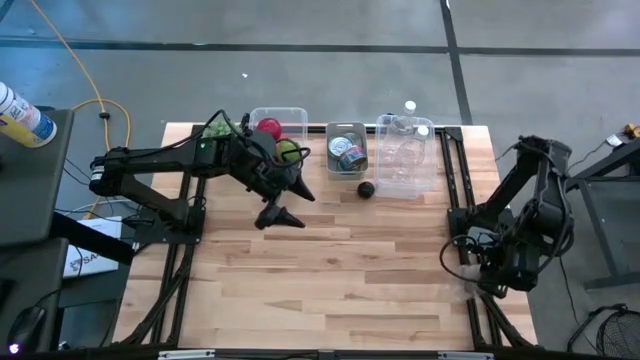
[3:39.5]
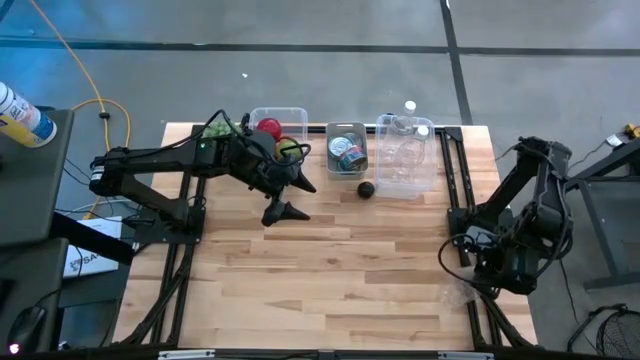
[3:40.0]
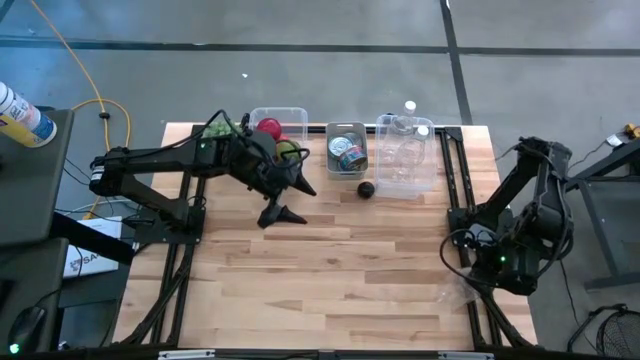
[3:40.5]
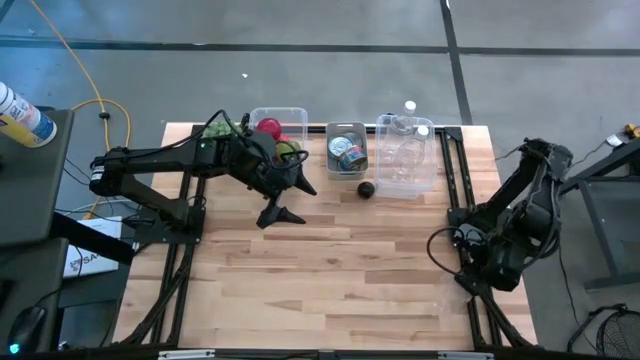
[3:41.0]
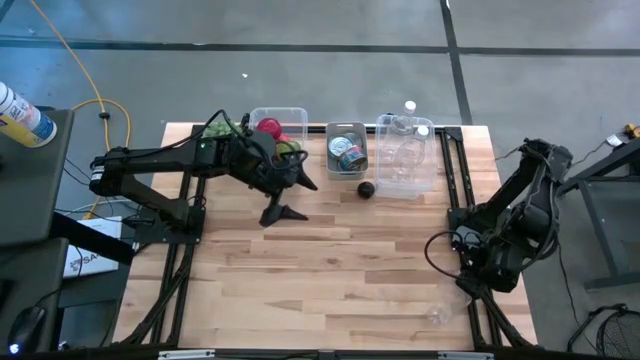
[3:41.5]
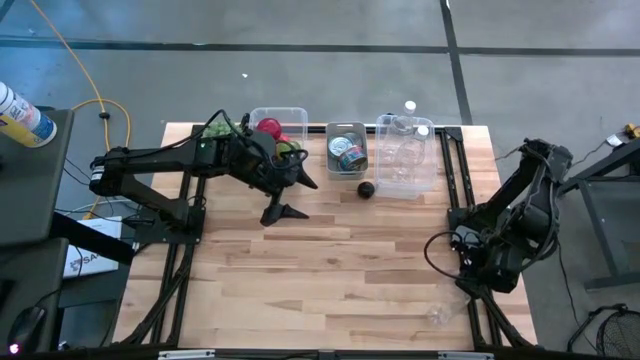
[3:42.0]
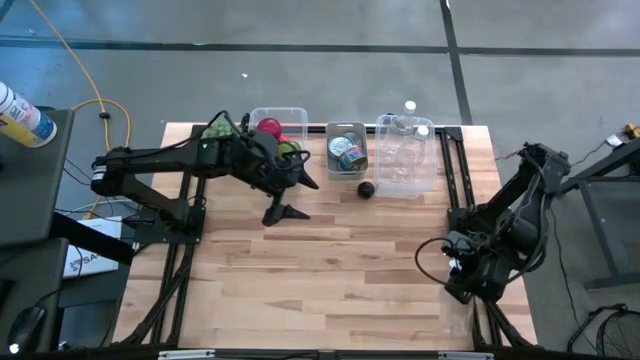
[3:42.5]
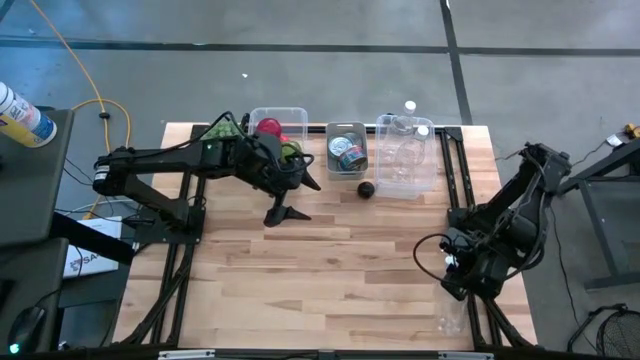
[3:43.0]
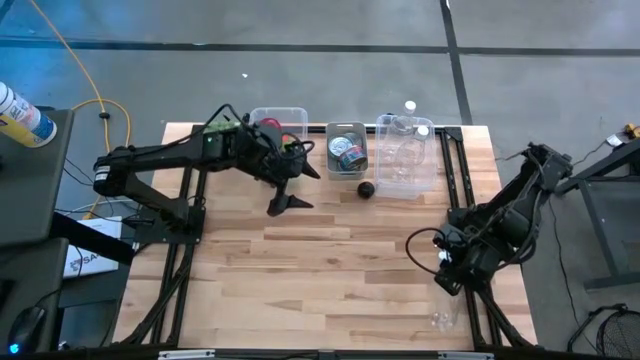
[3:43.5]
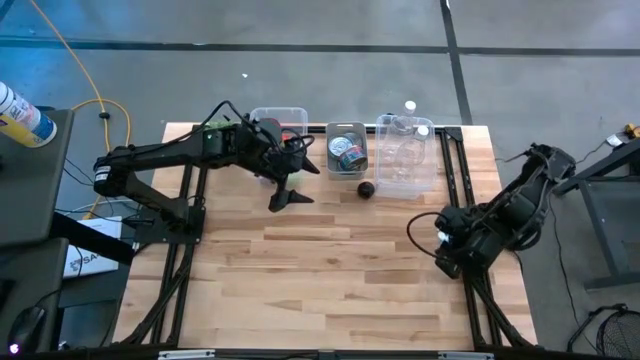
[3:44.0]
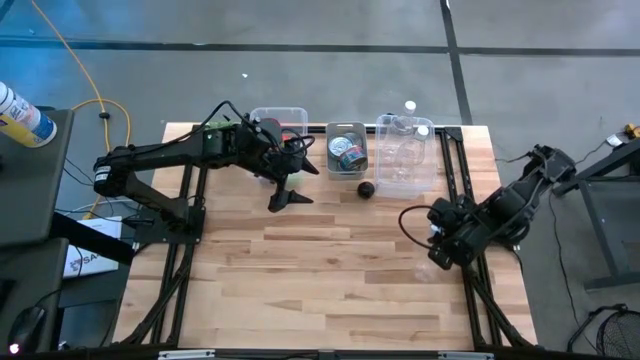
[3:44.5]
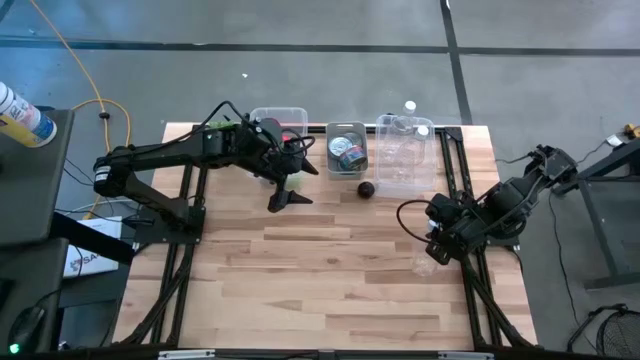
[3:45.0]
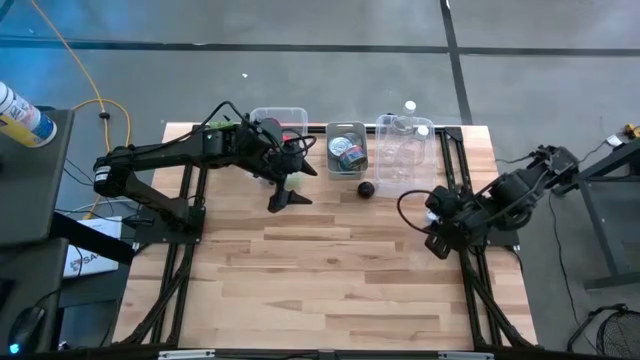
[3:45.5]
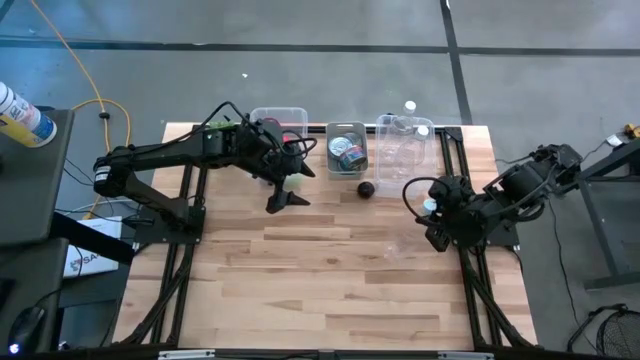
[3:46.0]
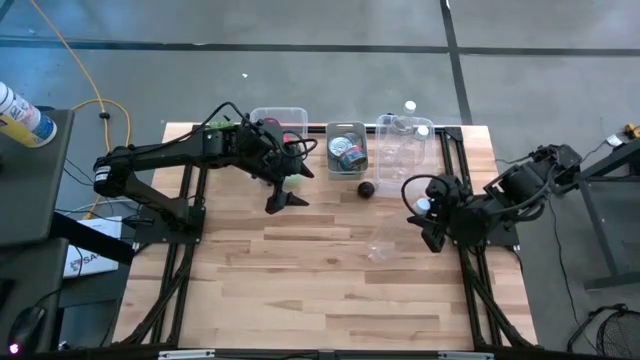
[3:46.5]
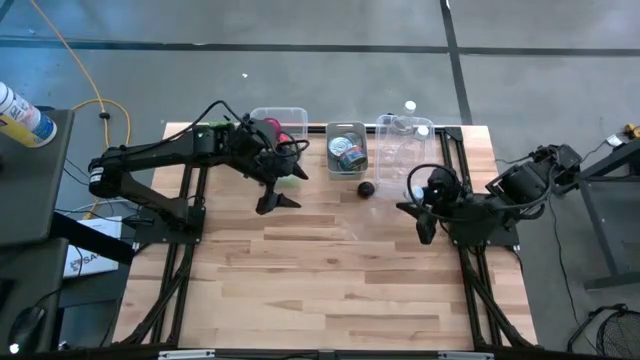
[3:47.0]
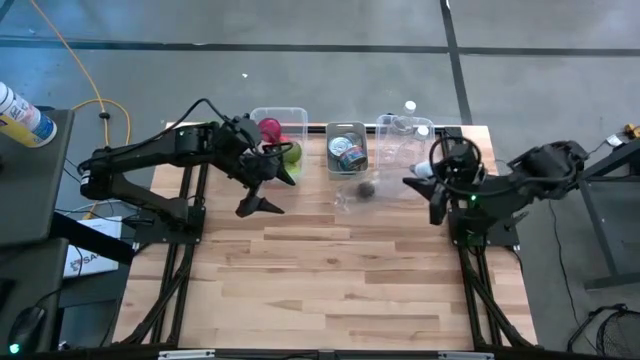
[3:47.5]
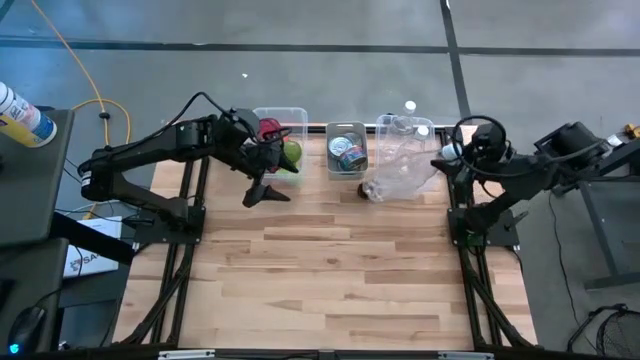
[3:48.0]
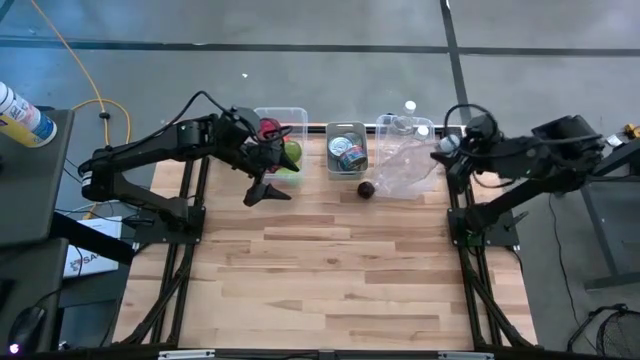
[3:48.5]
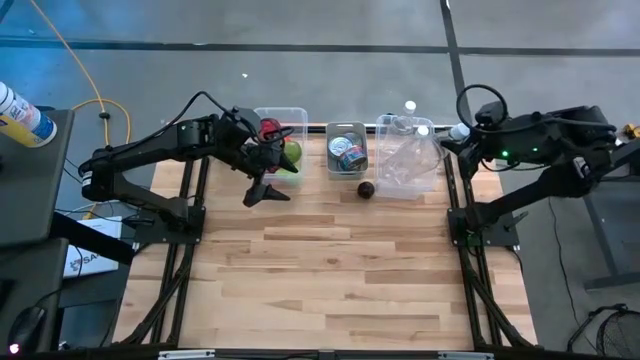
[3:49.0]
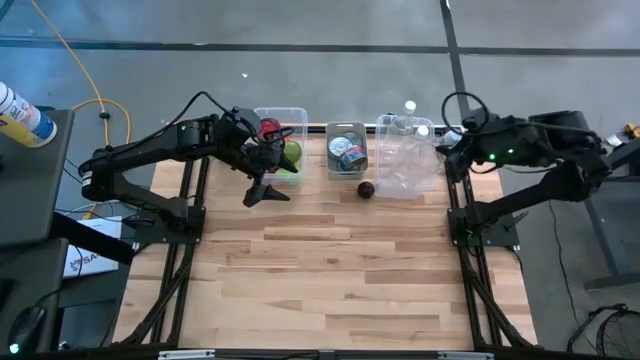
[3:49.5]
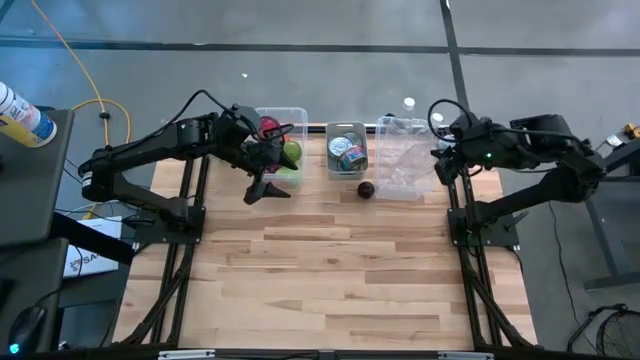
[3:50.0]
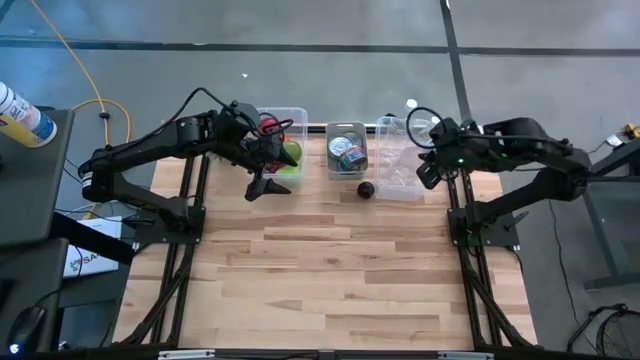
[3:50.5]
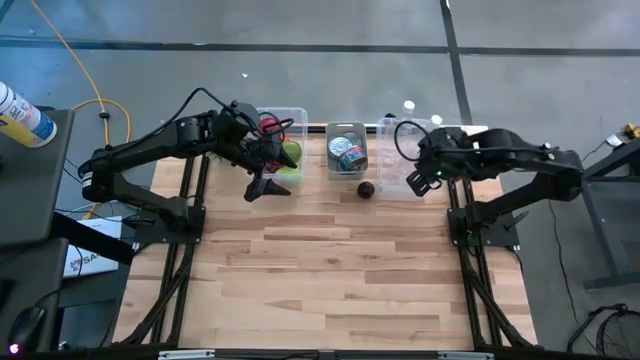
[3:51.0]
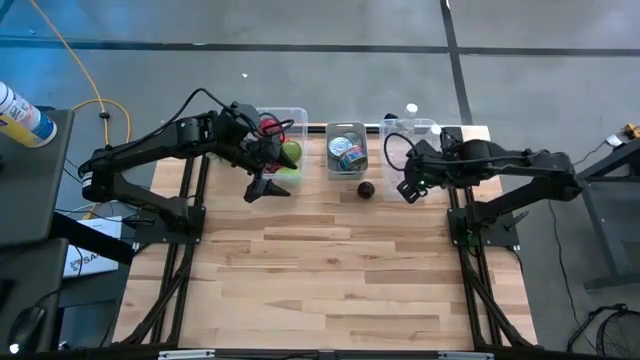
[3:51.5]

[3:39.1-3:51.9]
Task: Pick & Place Food Item
Put the empty water bottle into the right transparent bin
